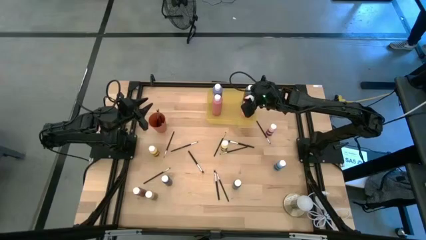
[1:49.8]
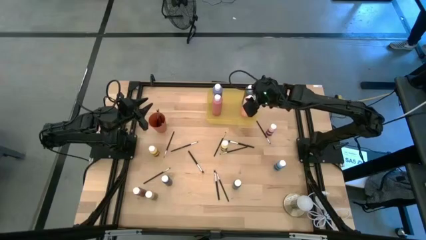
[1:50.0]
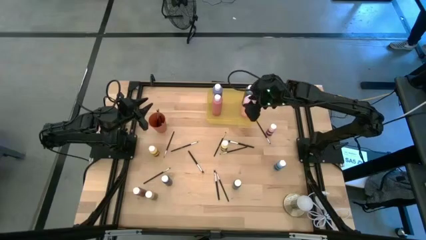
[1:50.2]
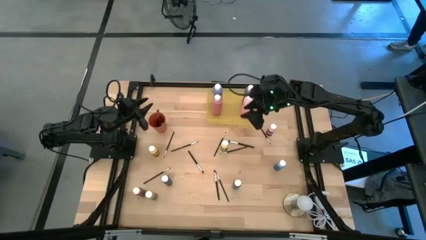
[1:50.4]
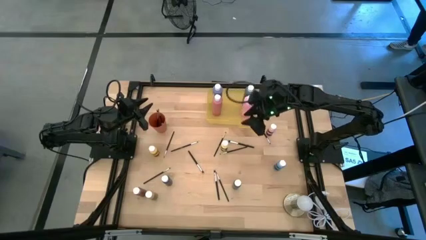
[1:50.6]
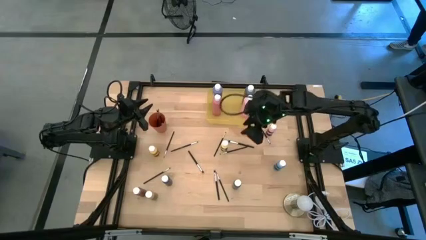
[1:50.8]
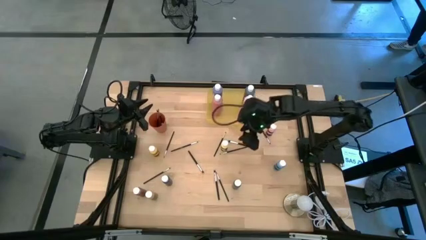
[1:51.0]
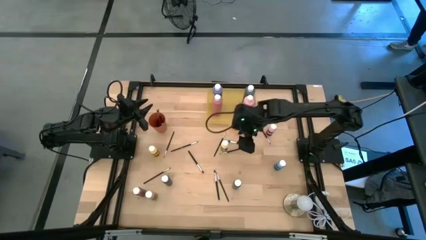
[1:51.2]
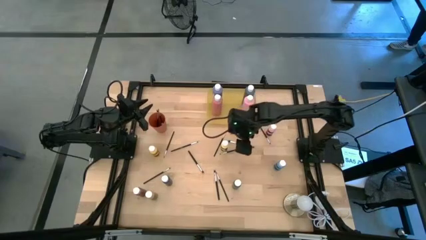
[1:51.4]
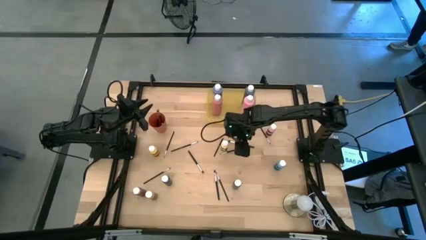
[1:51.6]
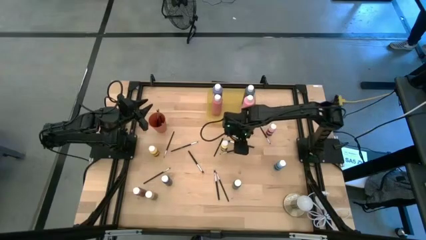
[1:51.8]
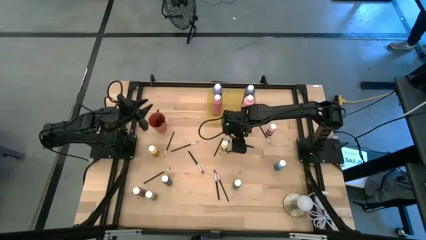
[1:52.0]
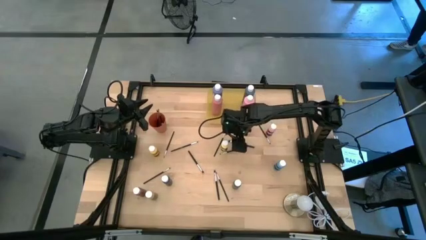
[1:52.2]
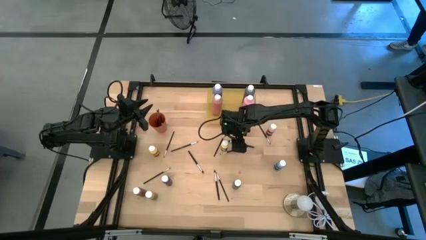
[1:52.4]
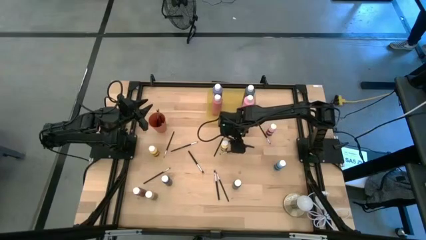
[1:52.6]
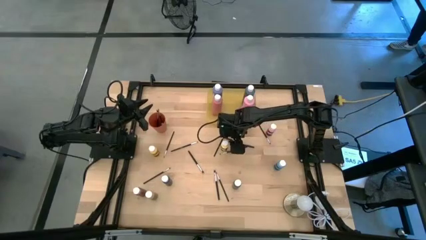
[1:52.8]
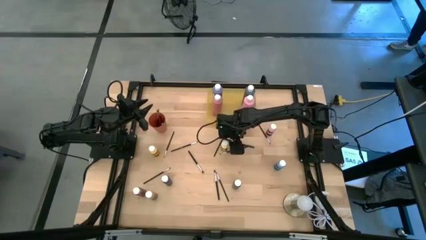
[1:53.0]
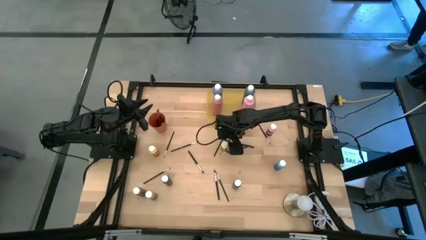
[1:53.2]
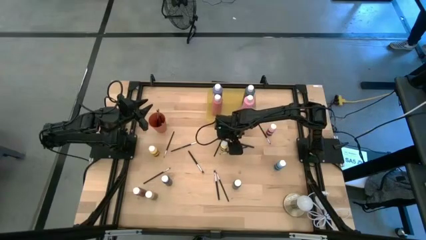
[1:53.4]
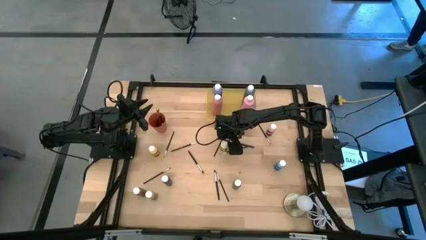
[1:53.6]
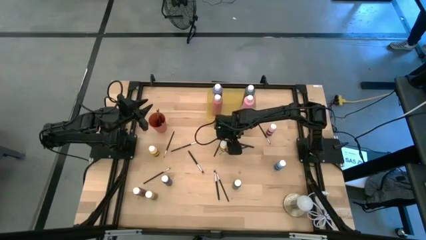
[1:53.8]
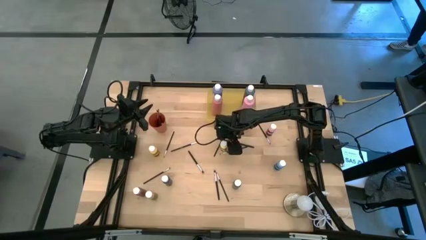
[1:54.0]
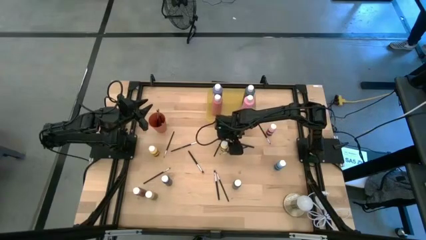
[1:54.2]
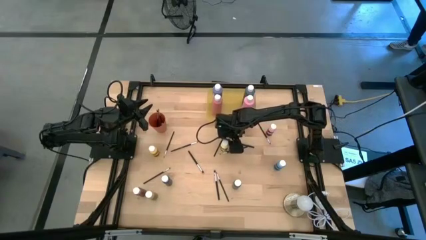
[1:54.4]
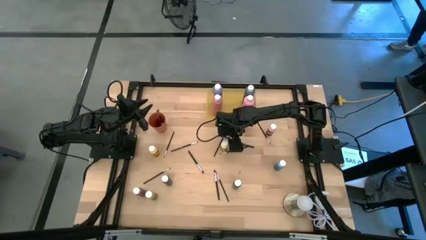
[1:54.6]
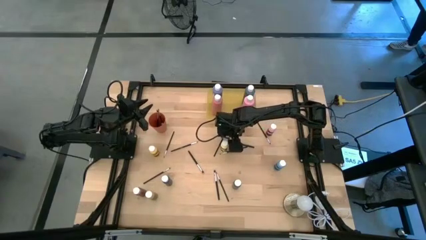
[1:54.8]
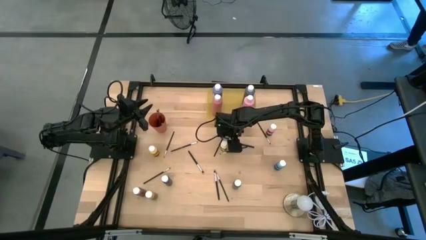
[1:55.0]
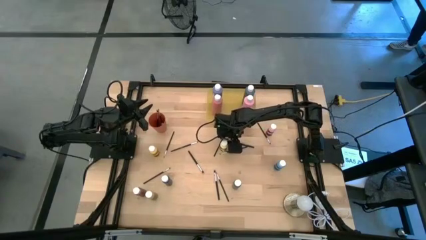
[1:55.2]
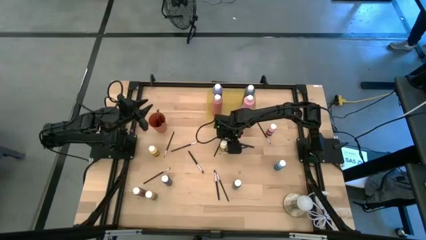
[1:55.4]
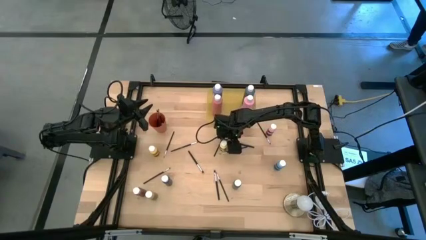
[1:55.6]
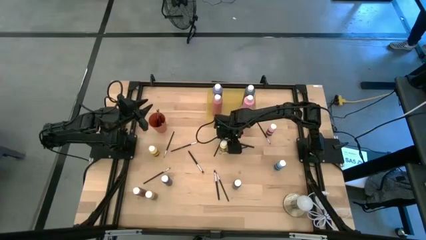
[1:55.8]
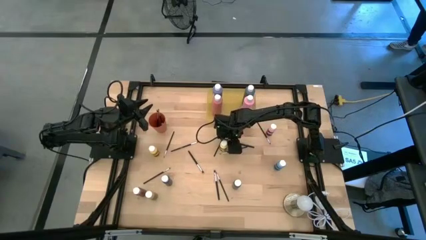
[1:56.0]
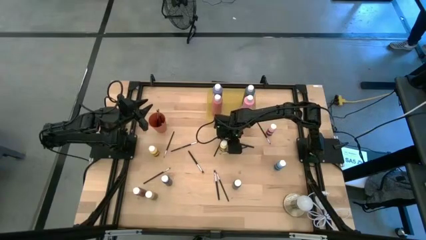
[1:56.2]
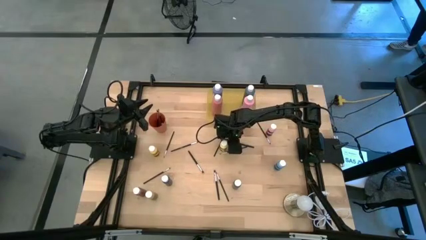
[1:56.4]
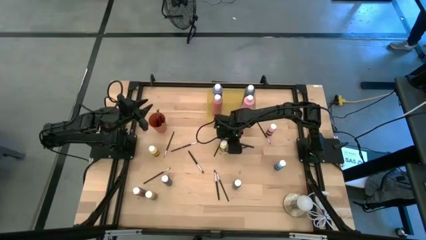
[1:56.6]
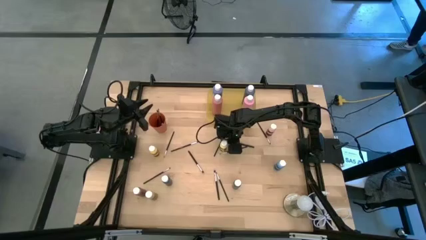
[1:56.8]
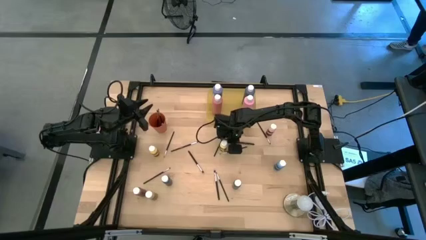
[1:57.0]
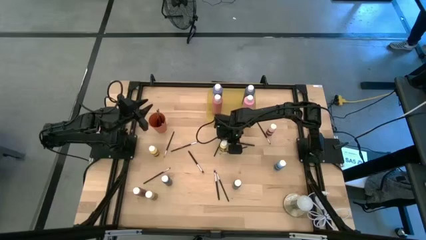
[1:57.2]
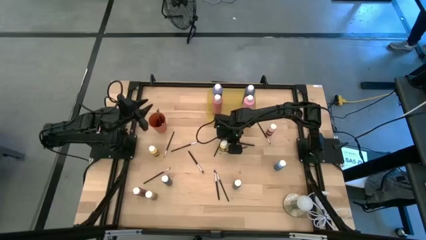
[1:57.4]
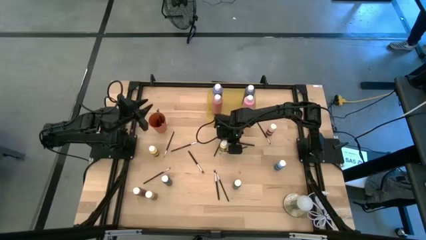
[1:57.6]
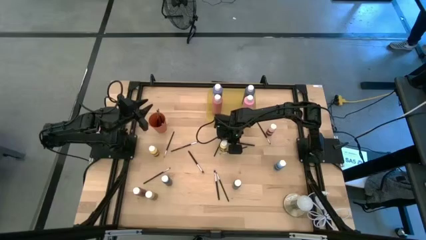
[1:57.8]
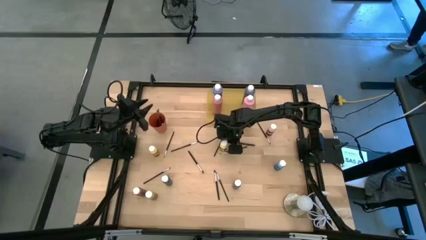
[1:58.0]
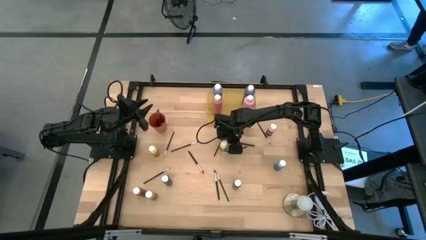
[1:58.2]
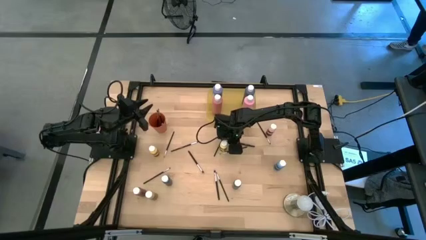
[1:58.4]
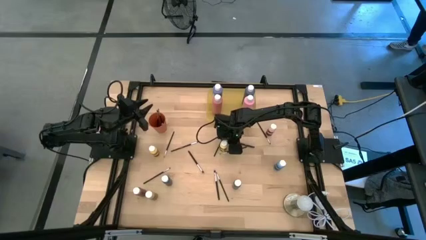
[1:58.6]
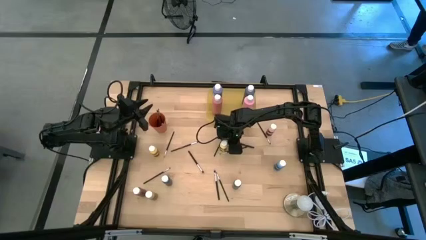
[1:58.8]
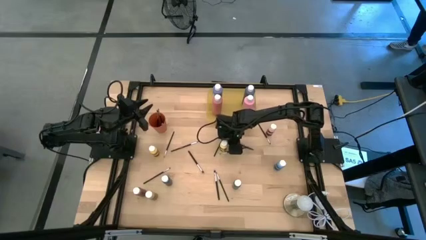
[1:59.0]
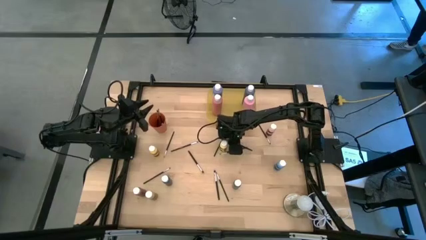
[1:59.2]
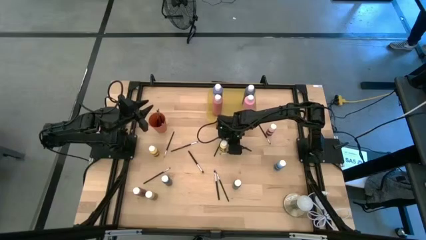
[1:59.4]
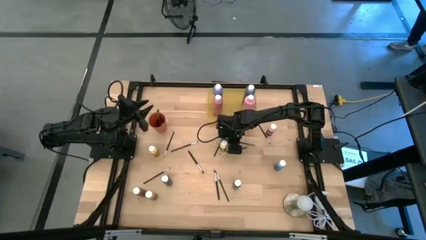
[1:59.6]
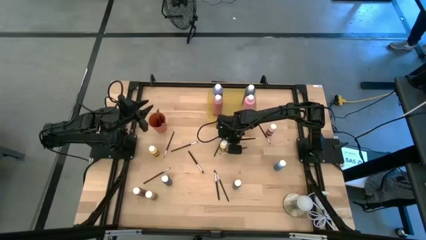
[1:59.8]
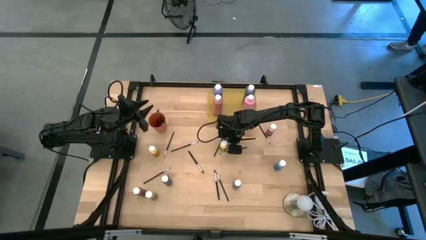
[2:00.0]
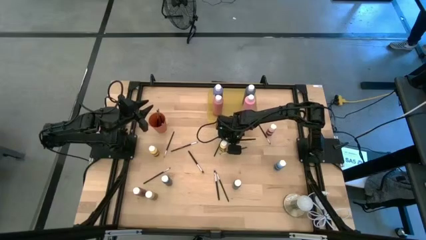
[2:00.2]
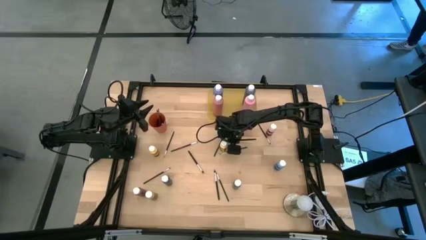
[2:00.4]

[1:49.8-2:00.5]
Task: Pick & Place Paint Supplies
Put the silver paint brush into the orange cup

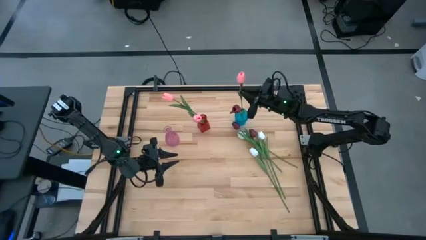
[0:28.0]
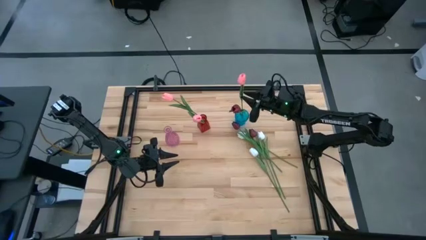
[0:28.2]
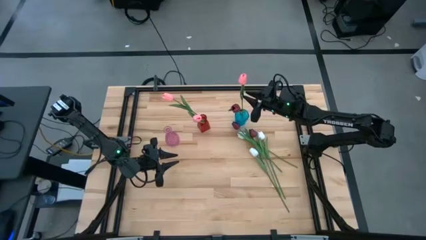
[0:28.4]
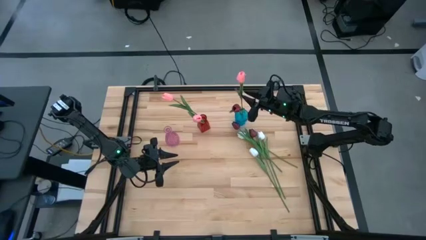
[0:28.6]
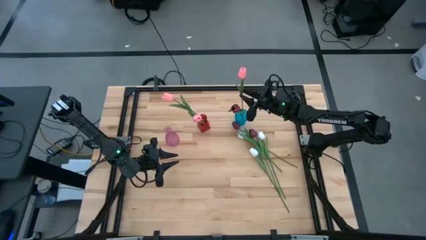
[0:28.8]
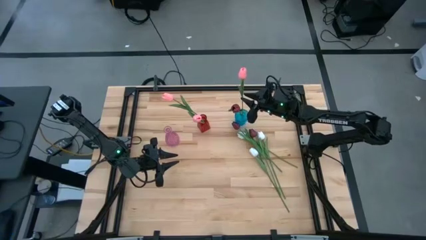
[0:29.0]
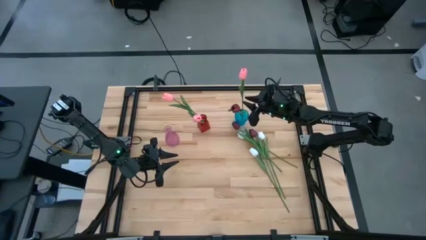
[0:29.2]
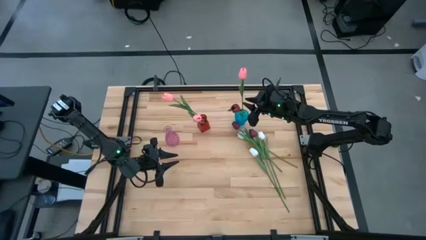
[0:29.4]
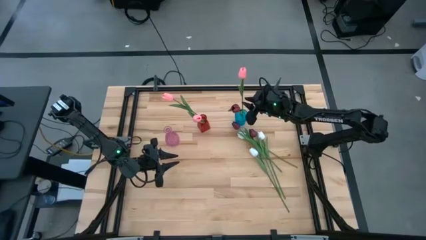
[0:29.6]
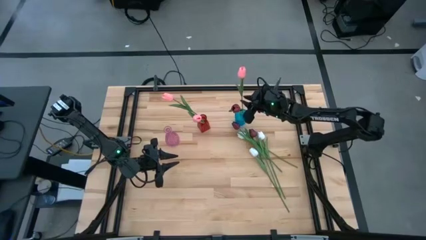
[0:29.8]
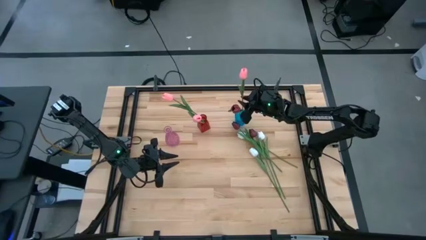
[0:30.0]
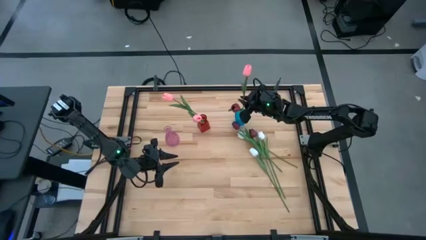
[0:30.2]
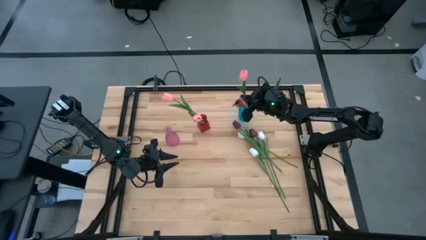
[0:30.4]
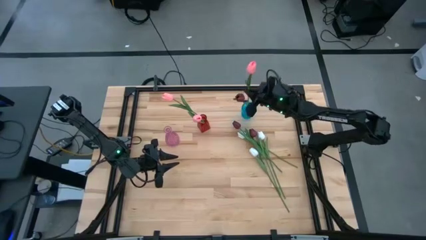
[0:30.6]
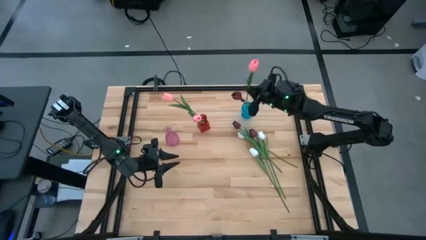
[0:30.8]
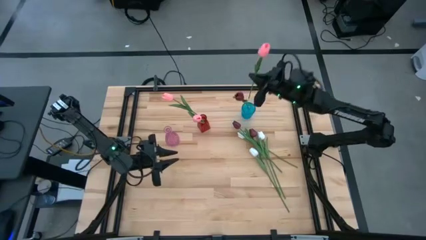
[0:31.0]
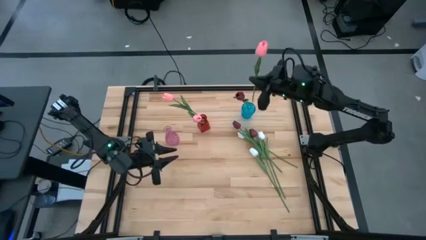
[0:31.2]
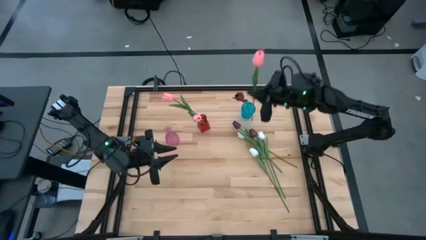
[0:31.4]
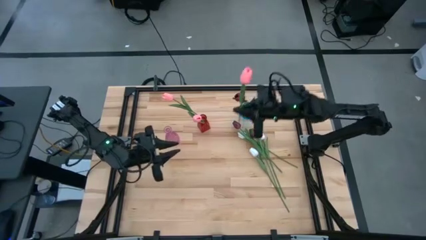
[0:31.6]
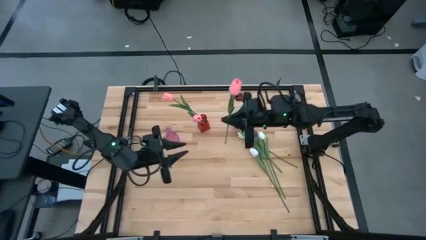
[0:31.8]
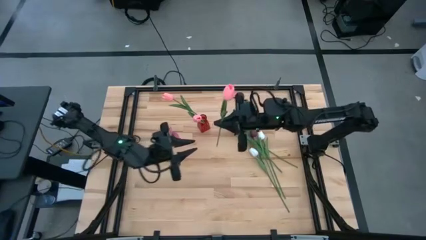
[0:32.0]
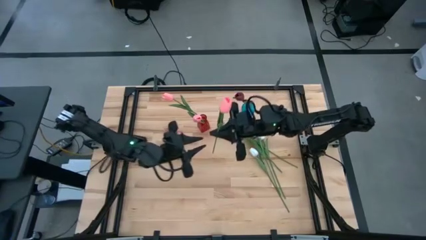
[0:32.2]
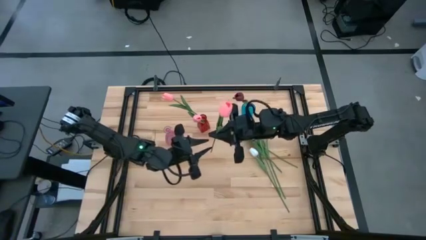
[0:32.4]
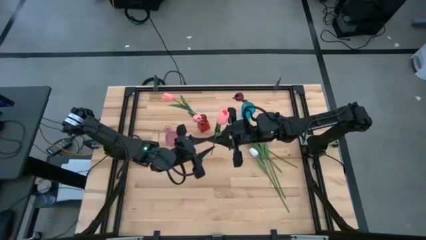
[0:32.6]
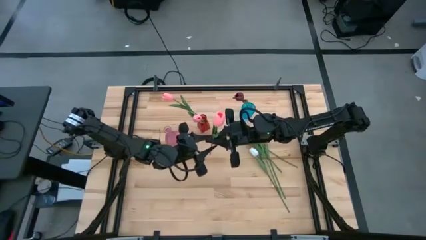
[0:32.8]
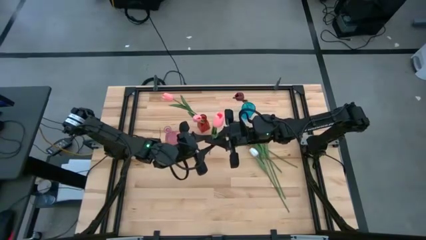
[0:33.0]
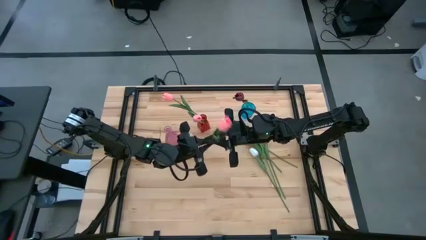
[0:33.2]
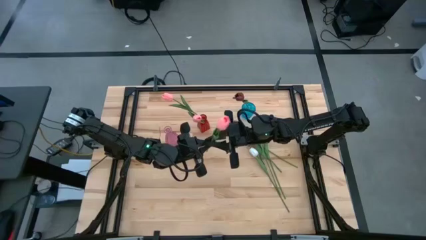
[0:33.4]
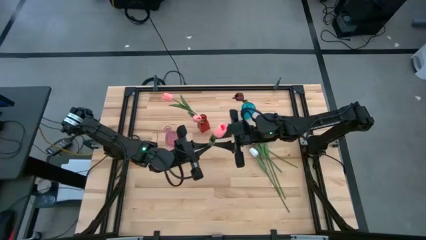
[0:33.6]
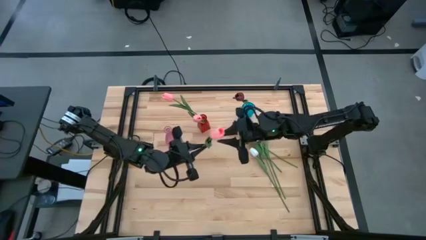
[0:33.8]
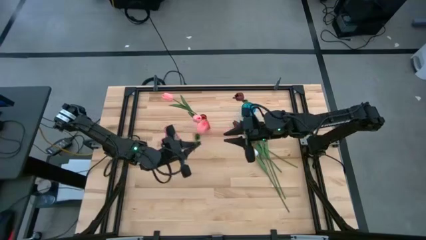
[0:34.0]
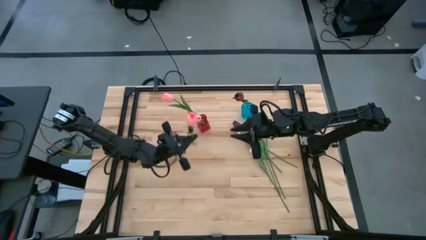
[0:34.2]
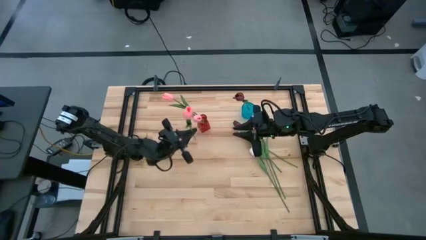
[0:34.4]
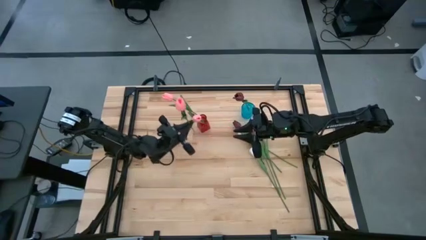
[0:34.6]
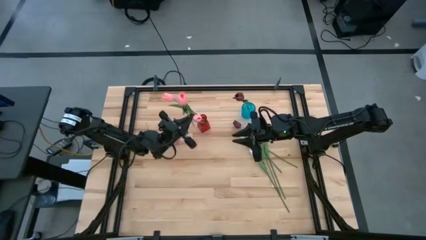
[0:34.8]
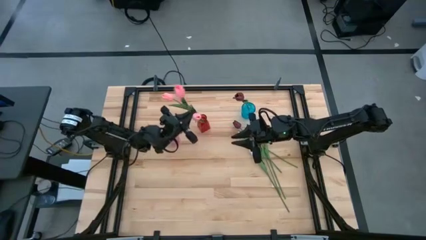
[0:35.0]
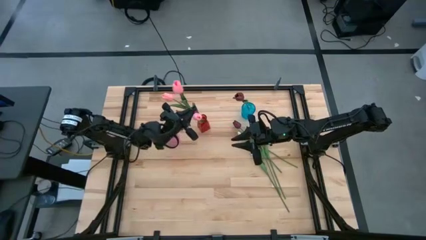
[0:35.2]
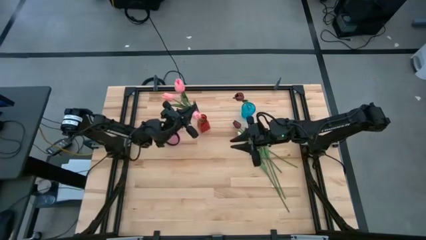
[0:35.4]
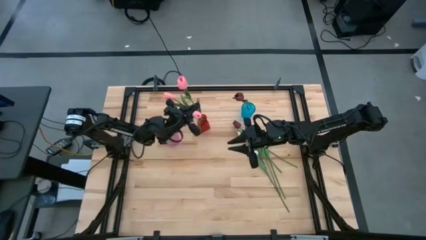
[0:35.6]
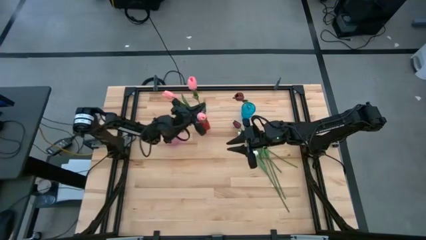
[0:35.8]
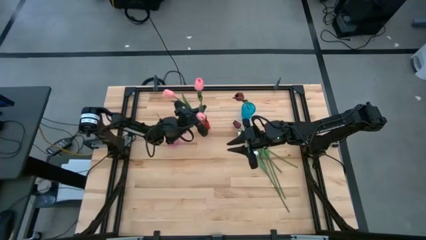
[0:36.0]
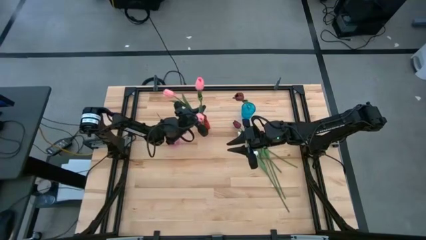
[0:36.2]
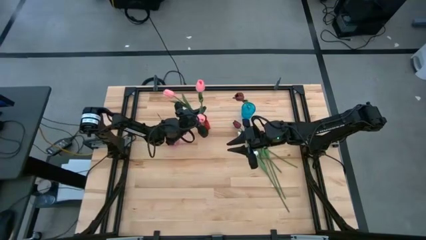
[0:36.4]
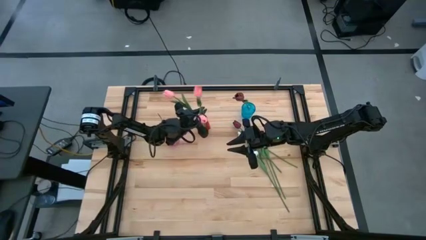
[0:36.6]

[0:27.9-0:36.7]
Task: Sort flowers into vase by color
Put the pink tulip into the red vase
